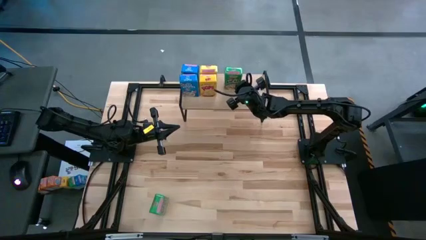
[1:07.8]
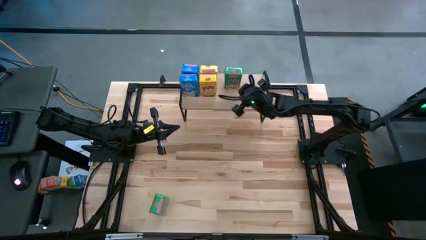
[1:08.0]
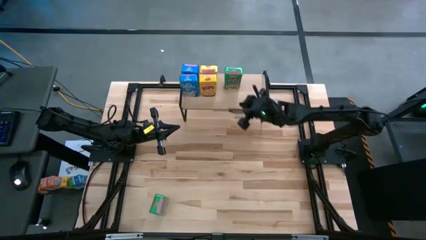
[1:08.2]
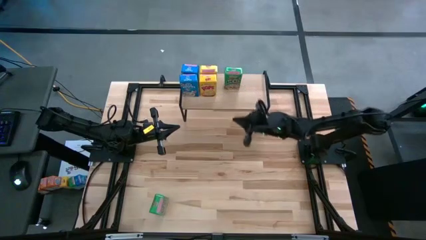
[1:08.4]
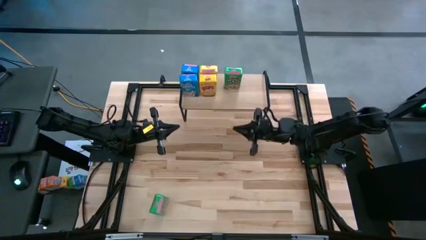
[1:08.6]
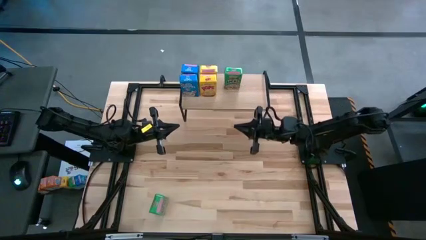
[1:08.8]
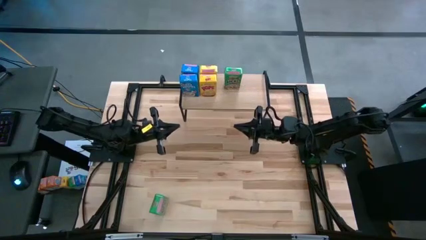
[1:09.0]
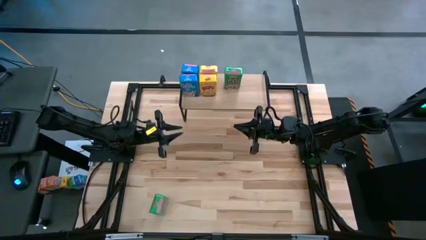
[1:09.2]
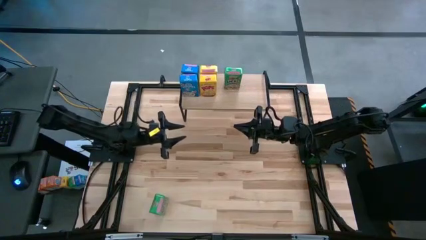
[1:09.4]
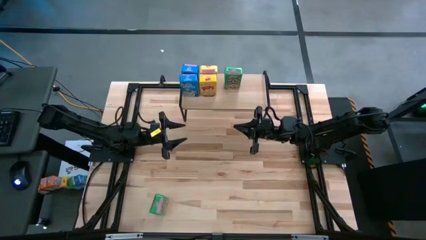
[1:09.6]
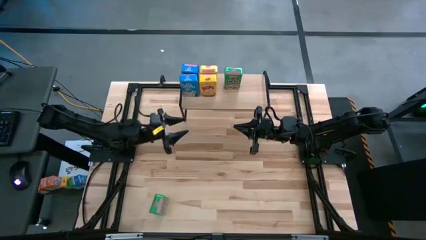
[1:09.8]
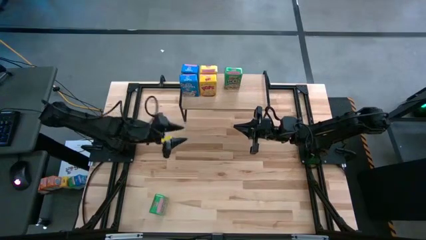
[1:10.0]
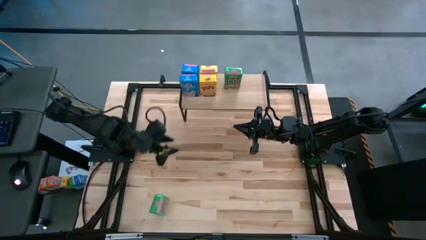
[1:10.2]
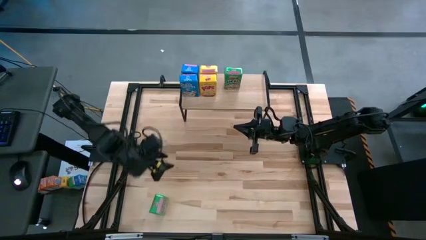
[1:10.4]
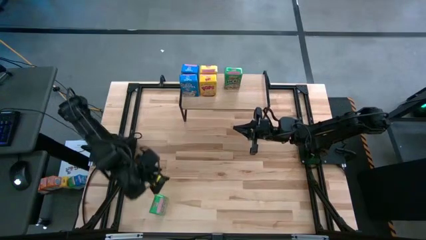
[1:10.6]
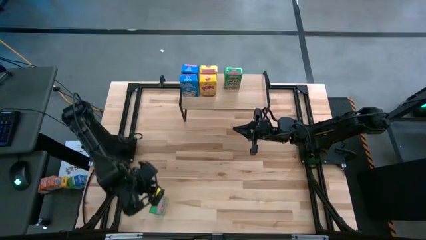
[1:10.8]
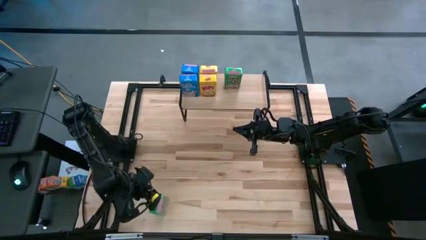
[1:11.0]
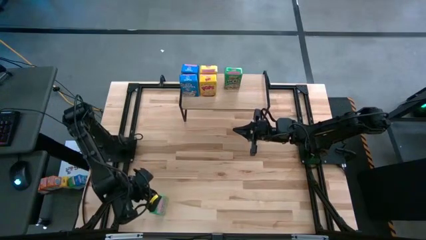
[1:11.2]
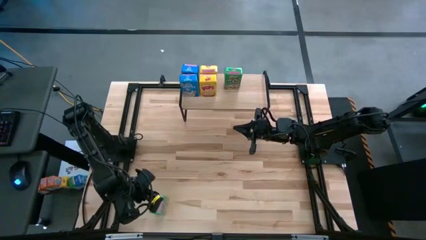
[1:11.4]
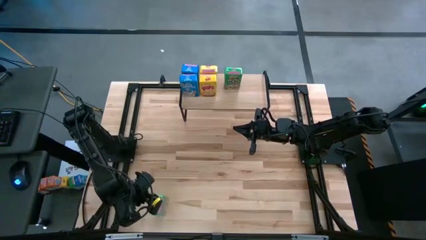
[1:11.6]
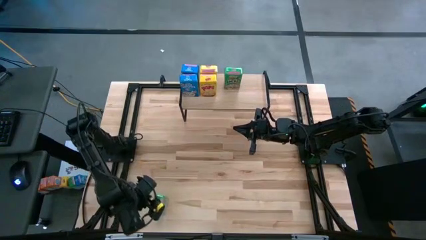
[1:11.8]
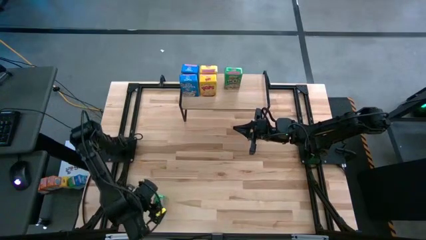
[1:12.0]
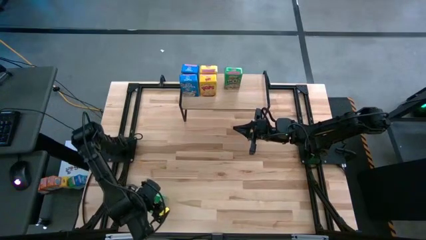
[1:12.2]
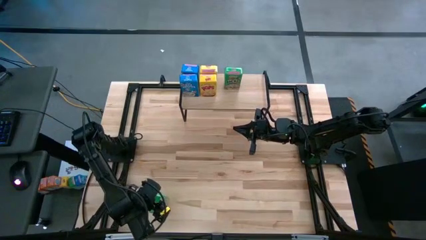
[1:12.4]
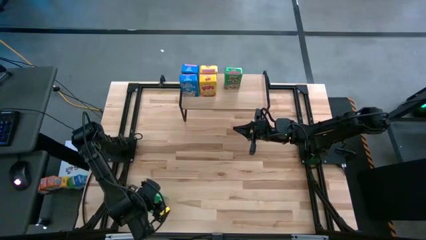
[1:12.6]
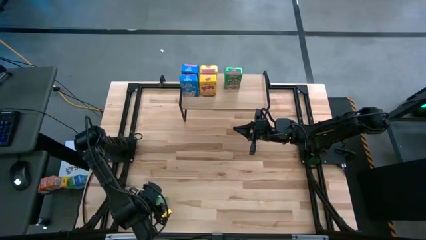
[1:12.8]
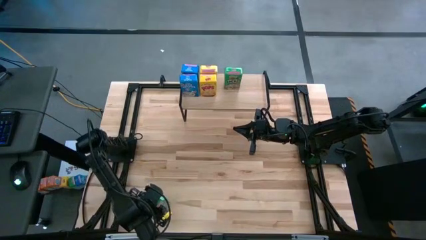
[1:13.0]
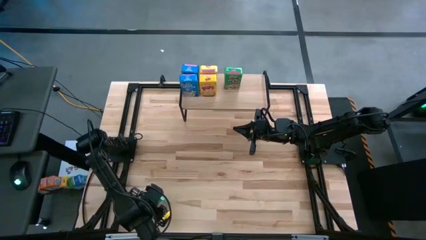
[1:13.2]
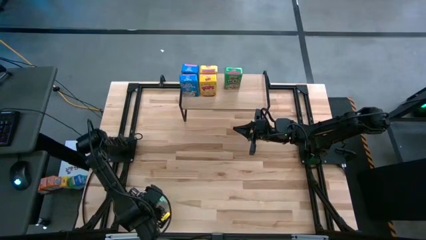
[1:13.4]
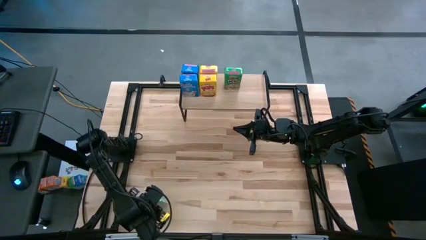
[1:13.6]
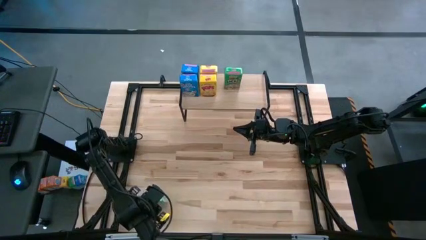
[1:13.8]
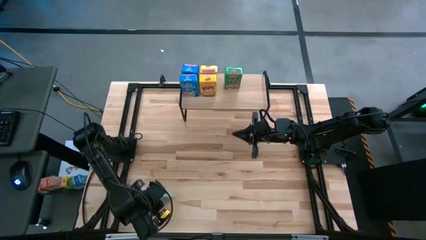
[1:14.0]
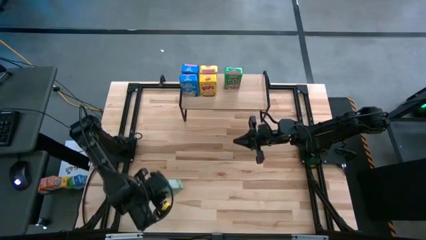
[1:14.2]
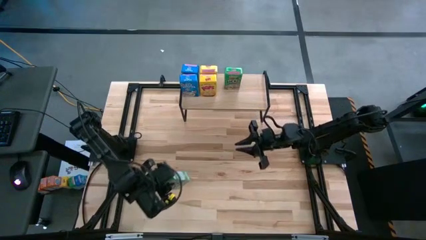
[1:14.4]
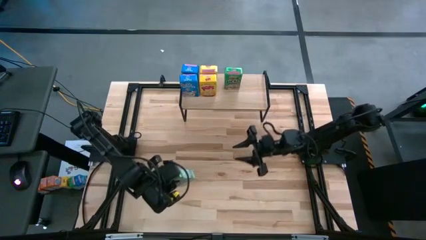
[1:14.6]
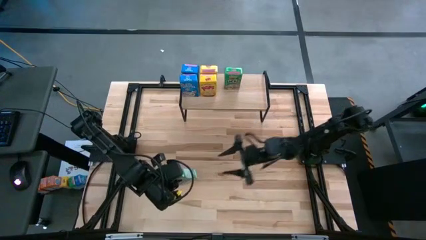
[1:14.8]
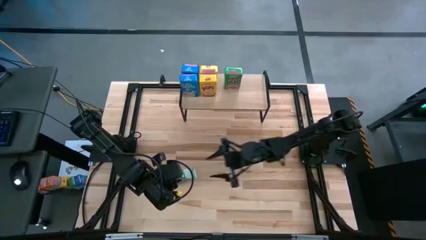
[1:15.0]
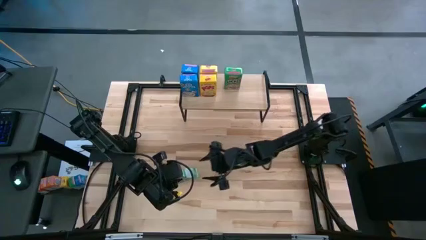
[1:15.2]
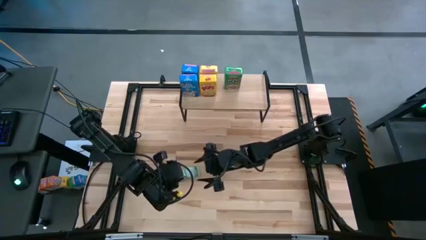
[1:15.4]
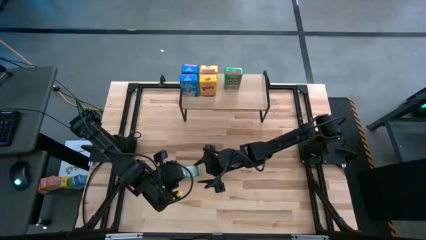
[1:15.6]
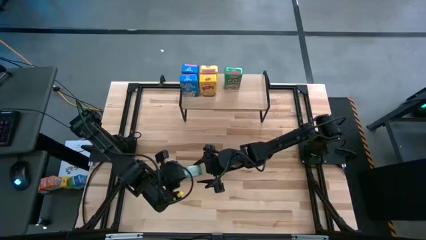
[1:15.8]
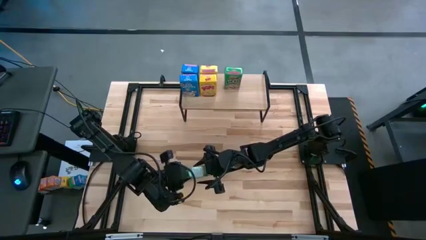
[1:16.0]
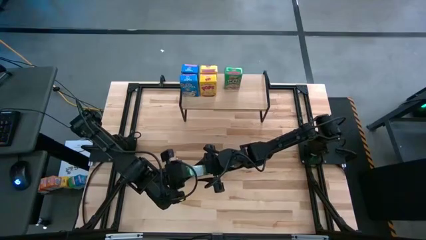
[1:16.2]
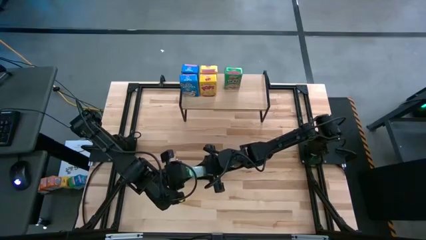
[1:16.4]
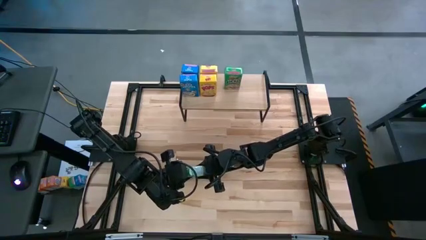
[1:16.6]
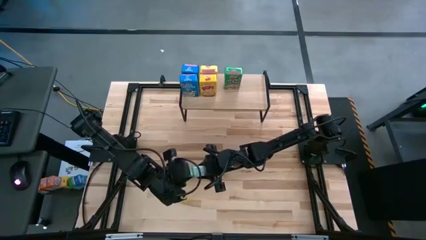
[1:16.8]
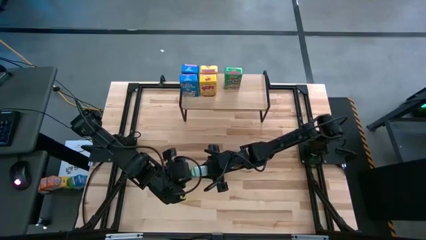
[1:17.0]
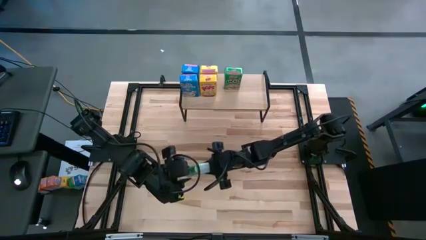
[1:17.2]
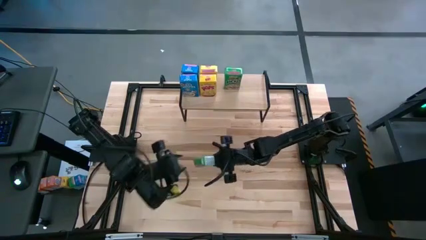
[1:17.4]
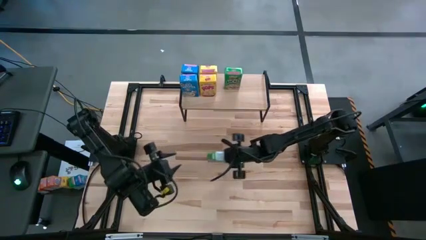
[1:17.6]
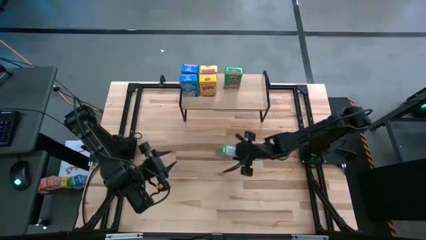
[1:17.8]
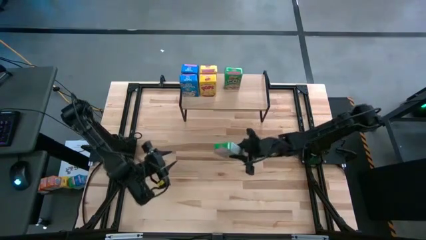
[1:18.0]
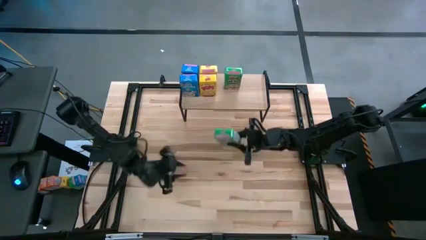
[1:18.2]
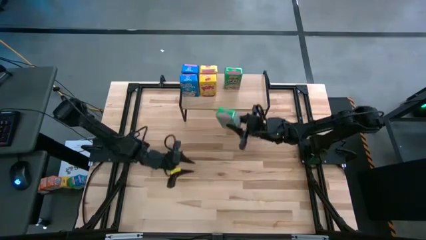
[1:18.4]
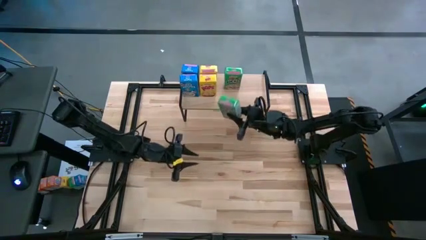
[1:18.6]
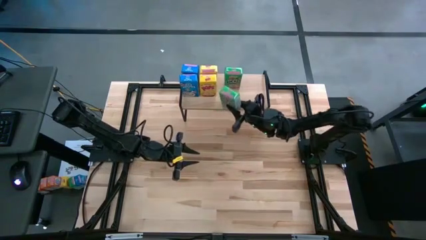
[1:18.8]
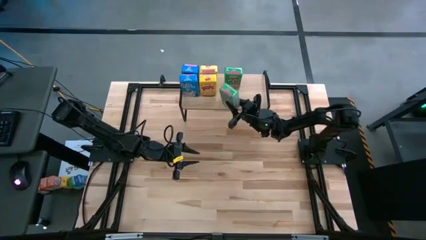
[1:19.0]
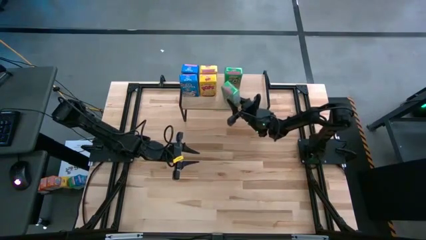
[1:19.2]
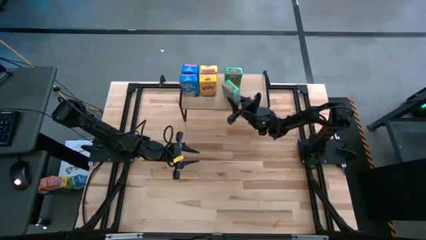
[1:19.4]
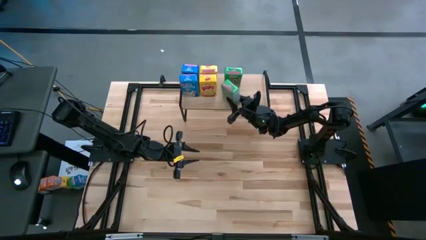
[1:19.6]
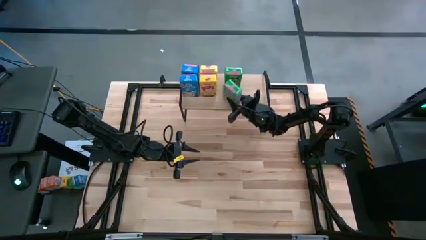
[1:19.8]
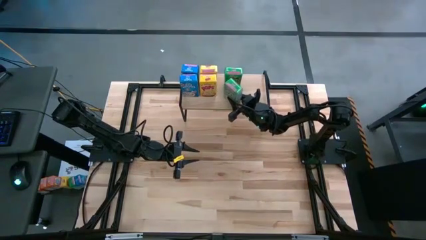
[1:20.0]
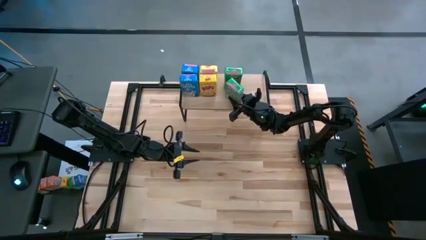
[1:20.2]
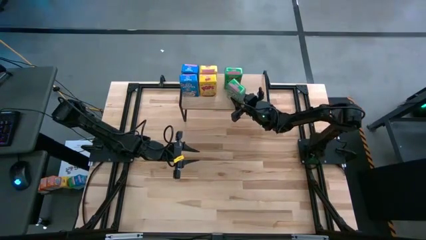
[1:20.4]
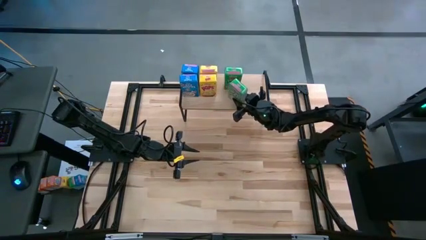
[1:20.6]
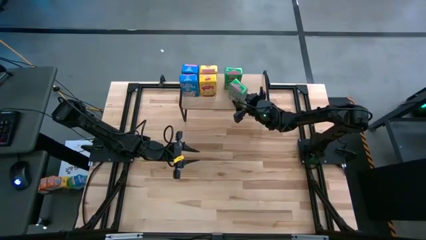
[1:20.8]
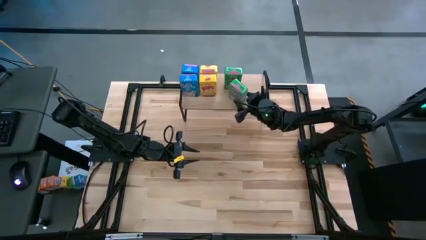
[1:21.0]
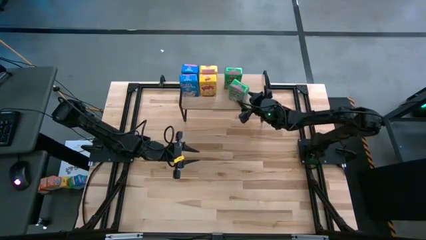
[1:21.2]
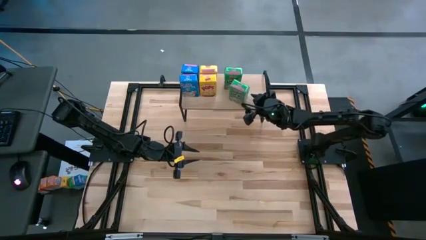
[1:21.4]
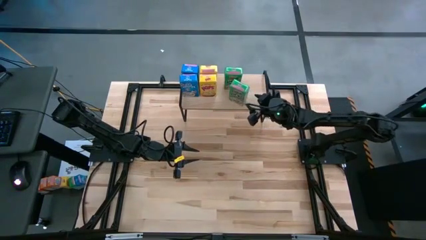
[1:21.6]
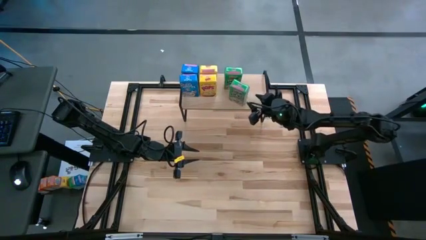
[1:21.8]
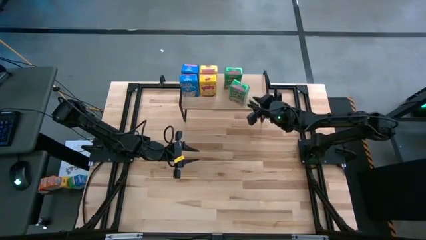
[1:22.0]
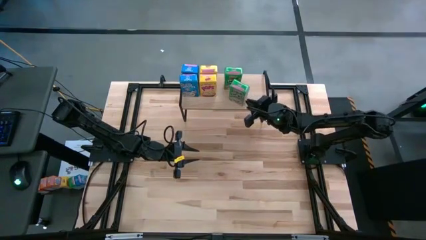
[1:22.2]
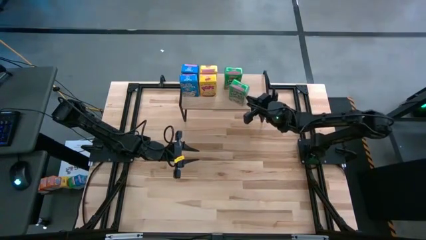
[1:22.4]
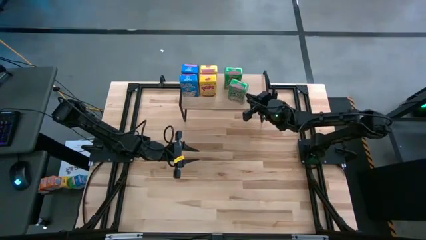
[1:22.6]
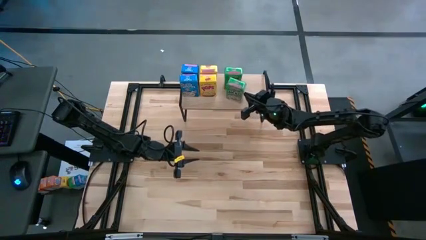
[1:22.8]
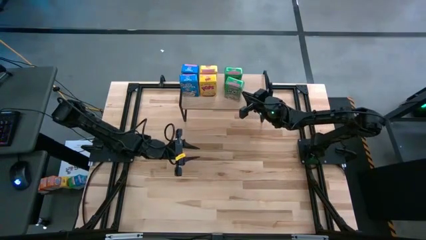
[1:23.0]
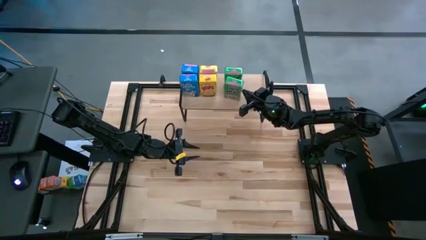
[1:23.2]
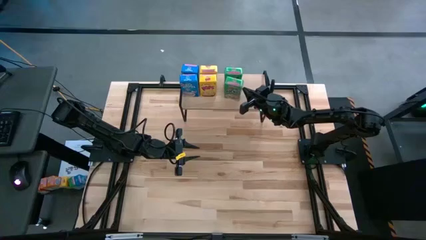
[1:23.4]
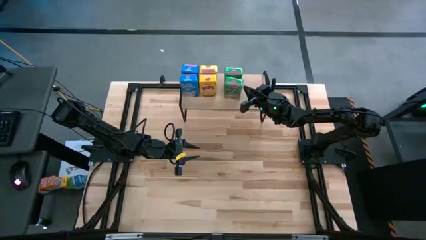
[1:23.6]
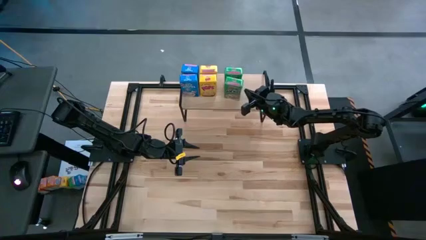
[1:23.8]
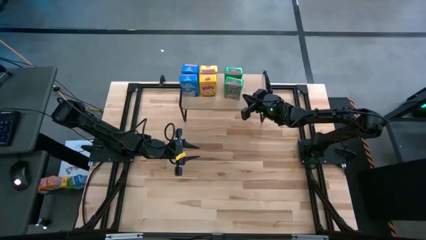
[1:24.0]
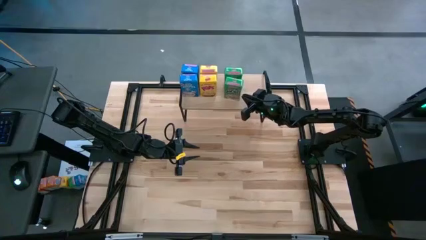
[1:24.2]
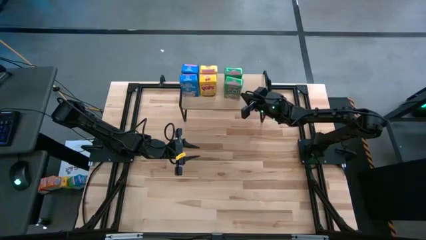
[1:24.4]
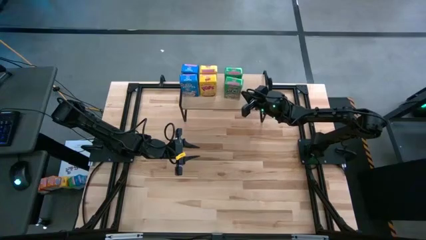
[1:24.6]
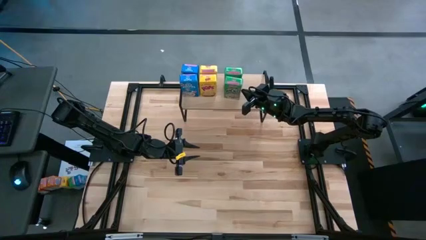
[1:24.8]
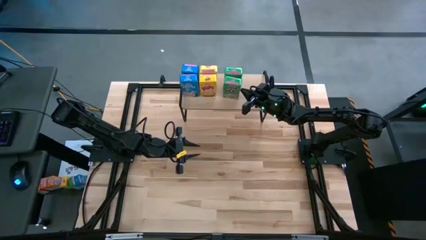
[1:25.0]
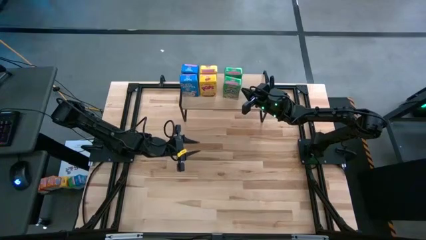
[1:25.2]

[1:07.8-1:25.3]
Task: Stack cereal on shelf
Put the green cereal box on the shelf aligned with the other green cereal box
